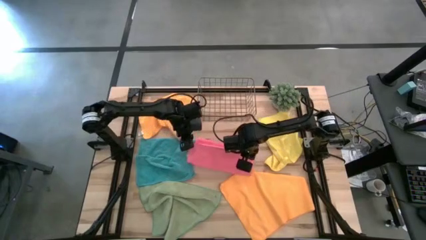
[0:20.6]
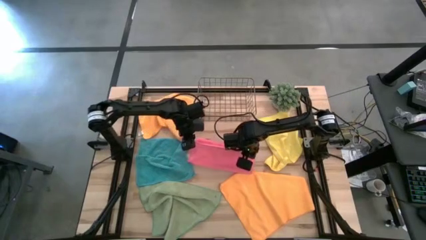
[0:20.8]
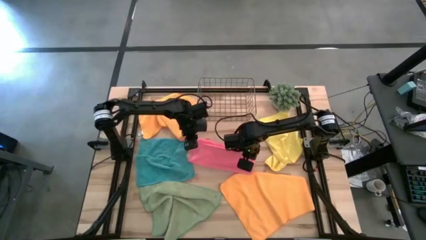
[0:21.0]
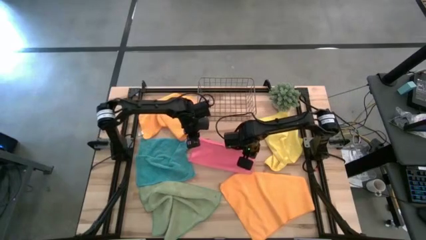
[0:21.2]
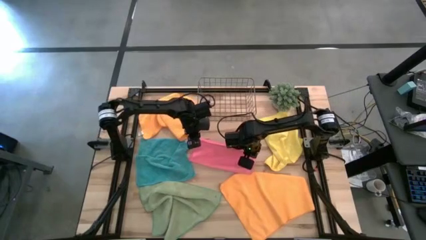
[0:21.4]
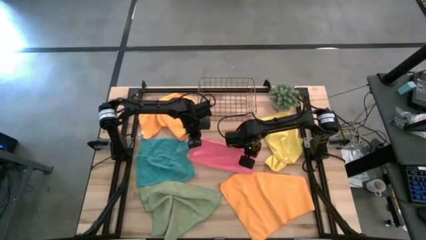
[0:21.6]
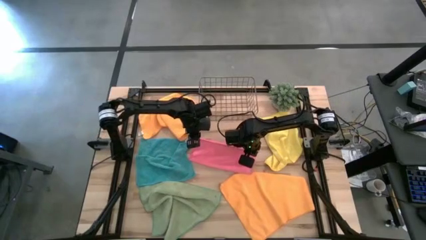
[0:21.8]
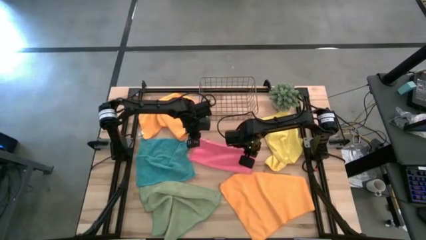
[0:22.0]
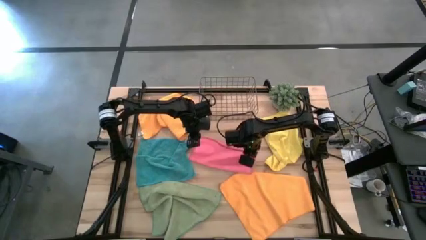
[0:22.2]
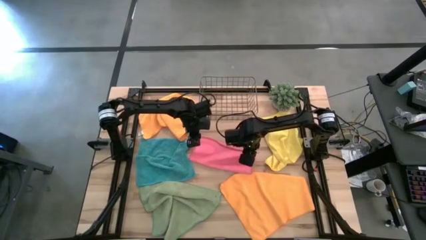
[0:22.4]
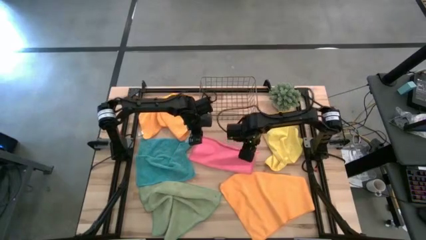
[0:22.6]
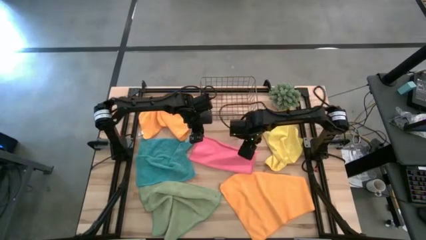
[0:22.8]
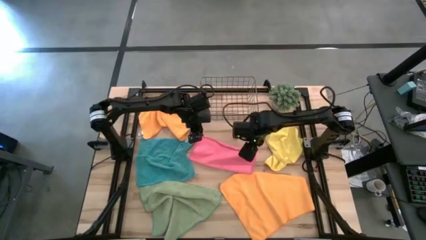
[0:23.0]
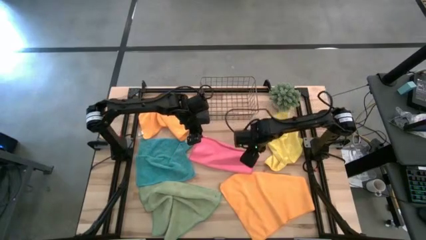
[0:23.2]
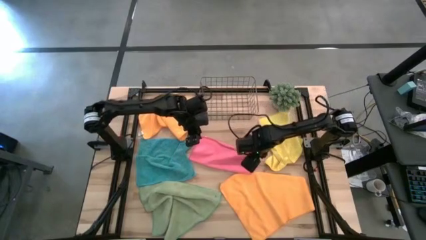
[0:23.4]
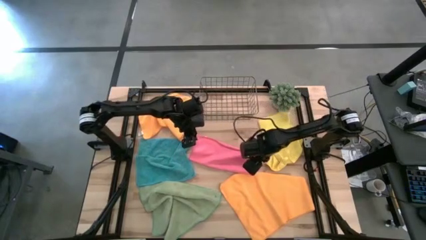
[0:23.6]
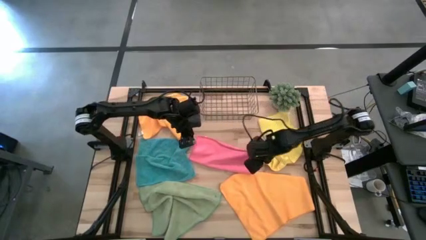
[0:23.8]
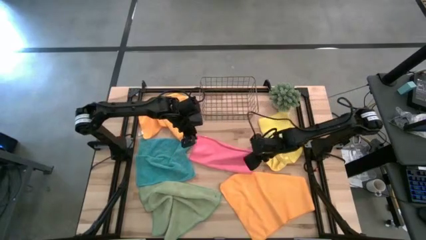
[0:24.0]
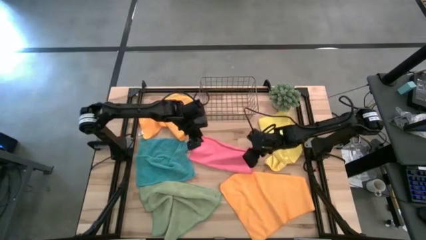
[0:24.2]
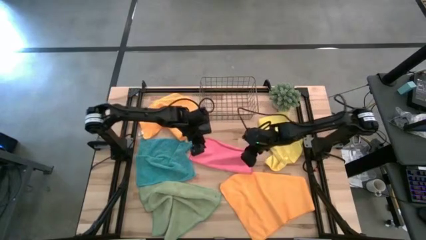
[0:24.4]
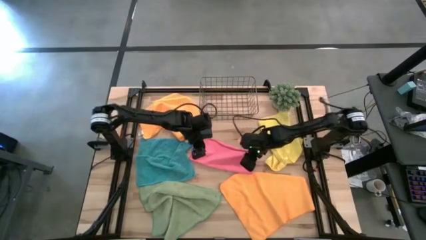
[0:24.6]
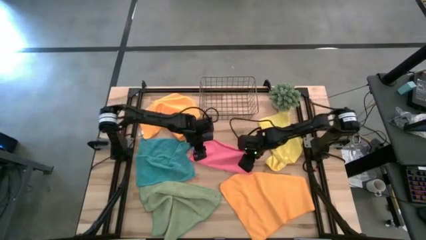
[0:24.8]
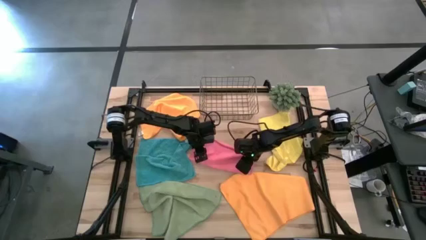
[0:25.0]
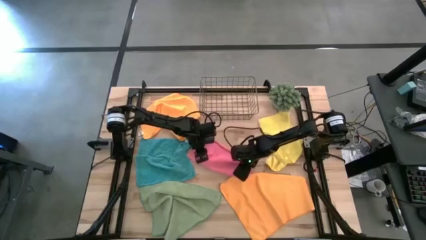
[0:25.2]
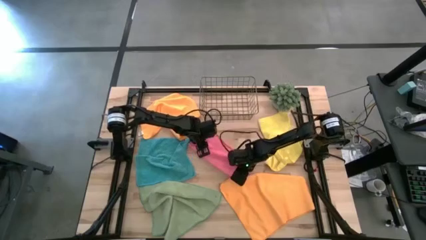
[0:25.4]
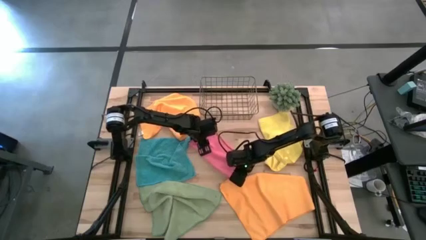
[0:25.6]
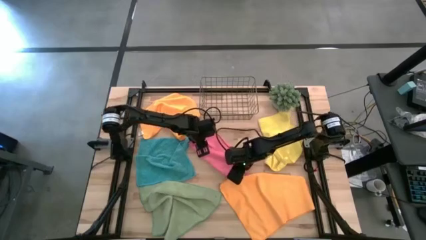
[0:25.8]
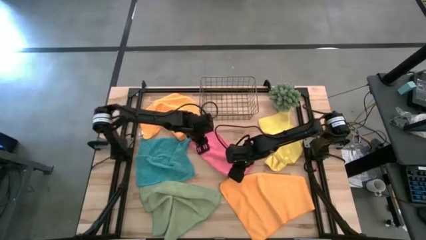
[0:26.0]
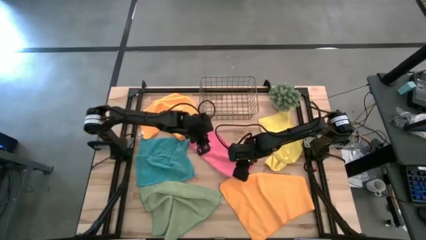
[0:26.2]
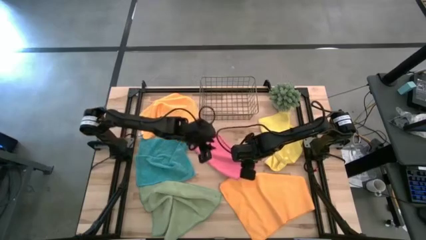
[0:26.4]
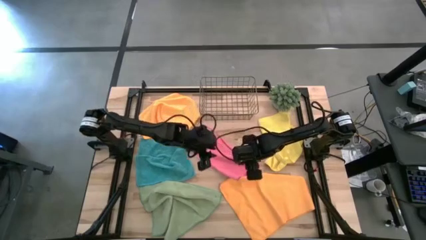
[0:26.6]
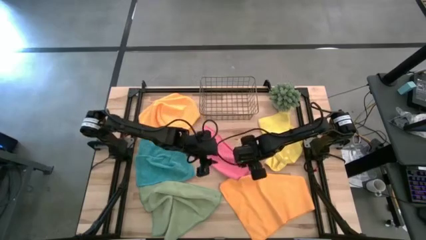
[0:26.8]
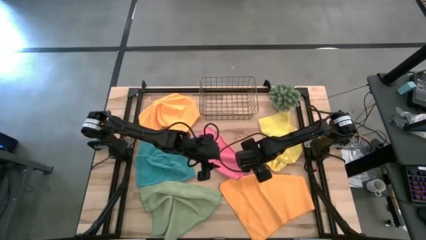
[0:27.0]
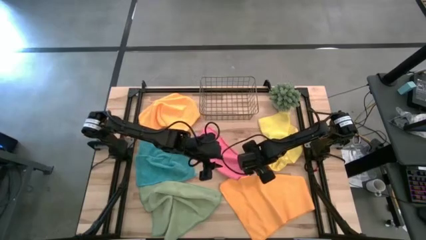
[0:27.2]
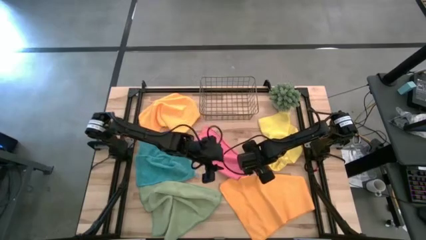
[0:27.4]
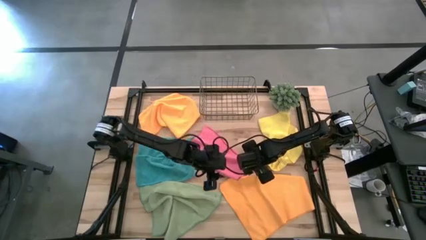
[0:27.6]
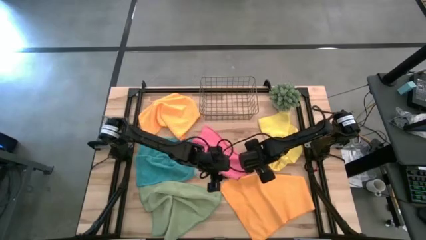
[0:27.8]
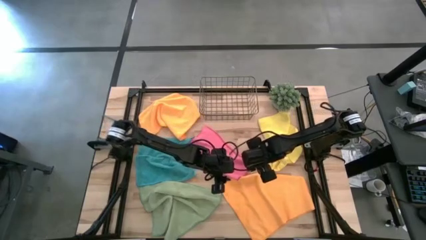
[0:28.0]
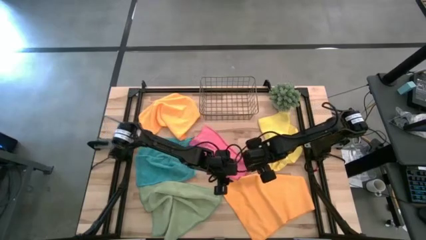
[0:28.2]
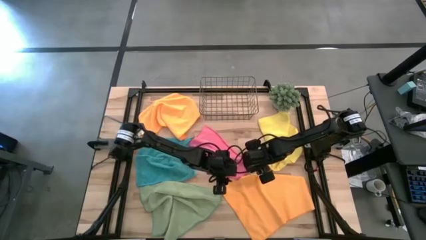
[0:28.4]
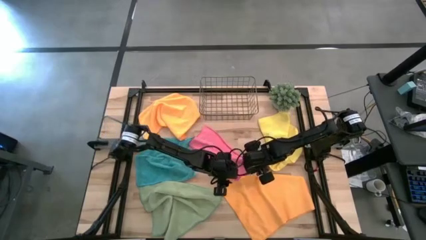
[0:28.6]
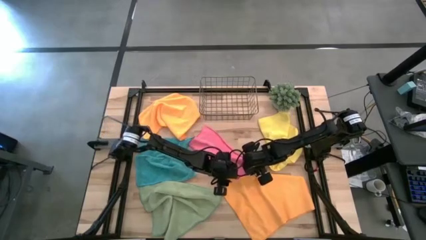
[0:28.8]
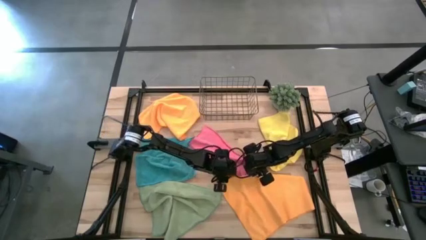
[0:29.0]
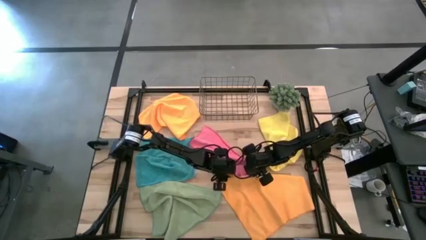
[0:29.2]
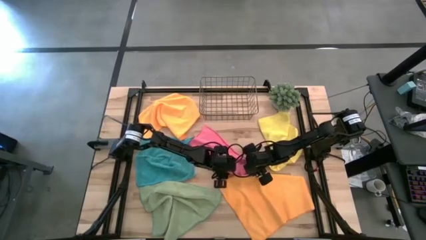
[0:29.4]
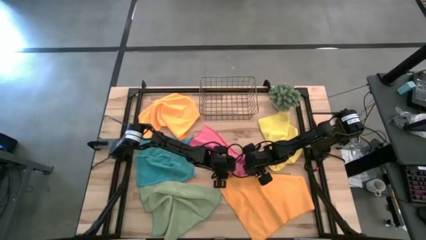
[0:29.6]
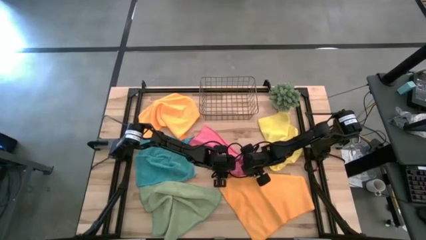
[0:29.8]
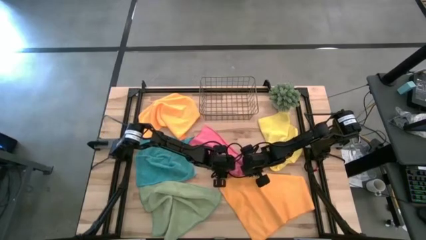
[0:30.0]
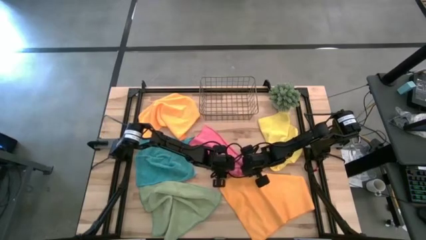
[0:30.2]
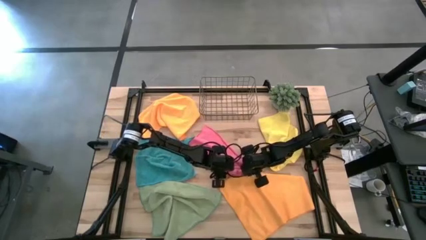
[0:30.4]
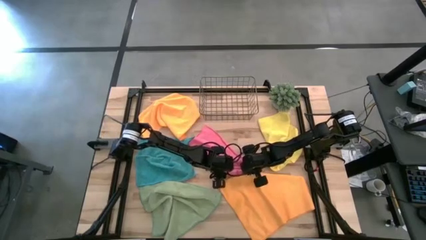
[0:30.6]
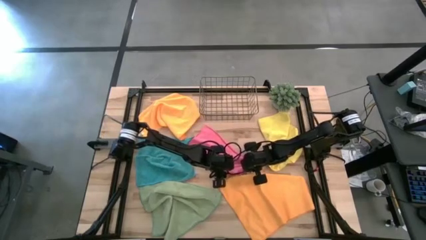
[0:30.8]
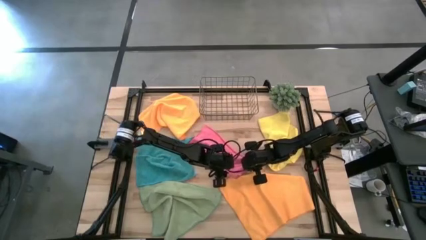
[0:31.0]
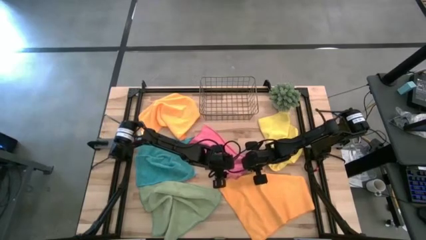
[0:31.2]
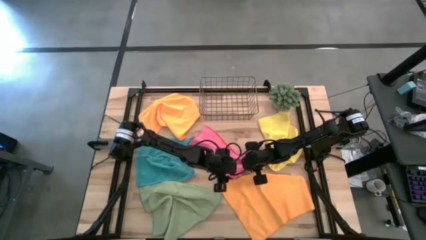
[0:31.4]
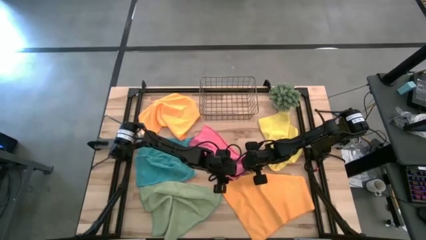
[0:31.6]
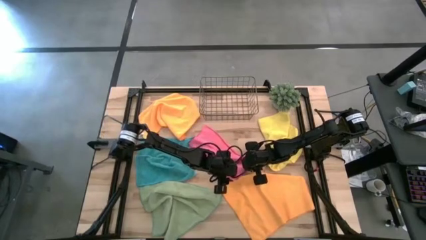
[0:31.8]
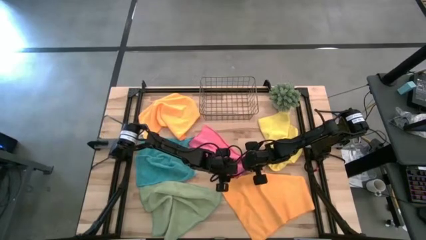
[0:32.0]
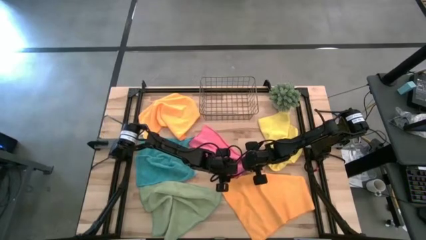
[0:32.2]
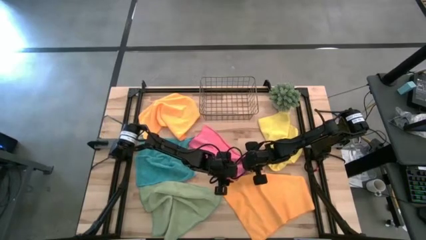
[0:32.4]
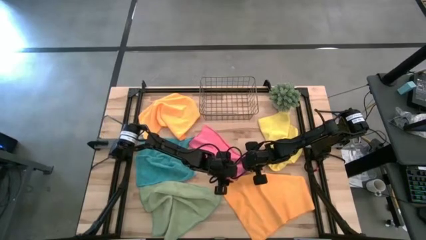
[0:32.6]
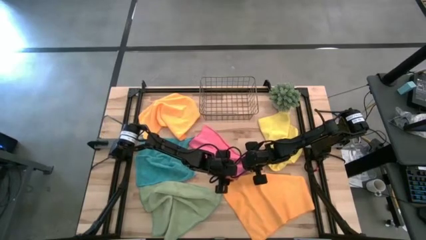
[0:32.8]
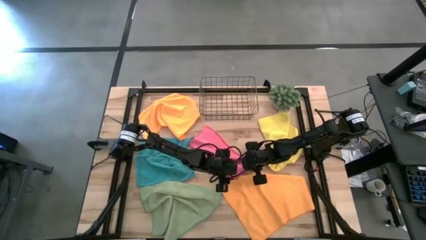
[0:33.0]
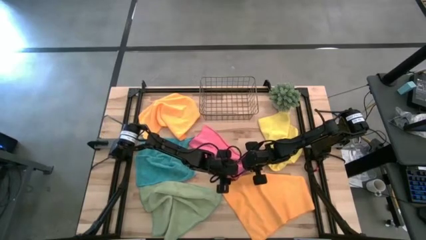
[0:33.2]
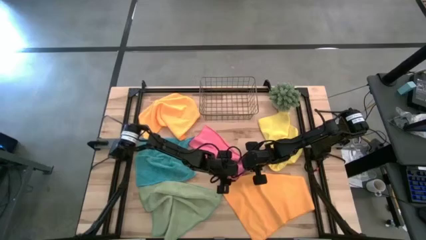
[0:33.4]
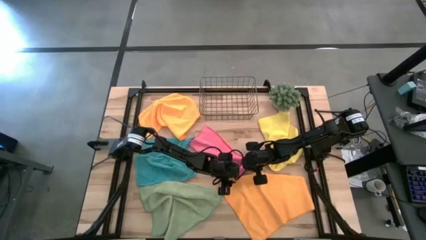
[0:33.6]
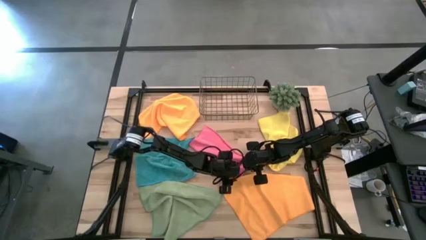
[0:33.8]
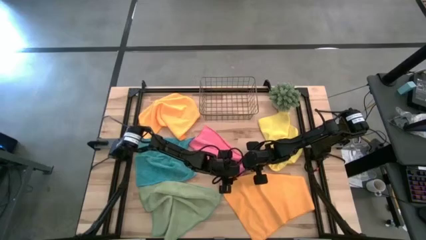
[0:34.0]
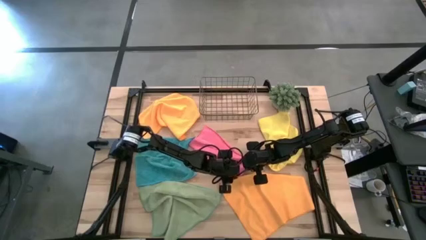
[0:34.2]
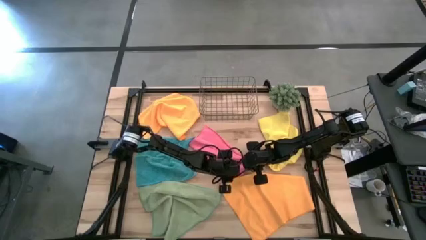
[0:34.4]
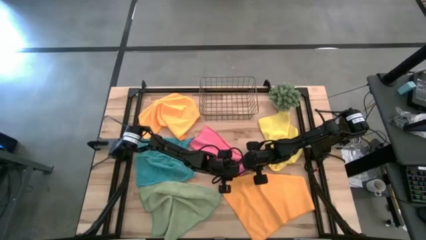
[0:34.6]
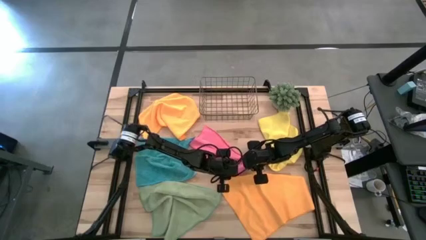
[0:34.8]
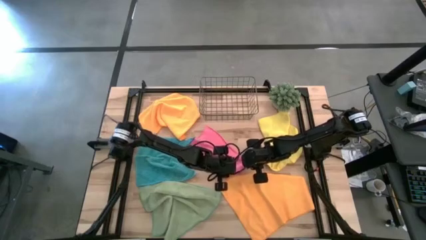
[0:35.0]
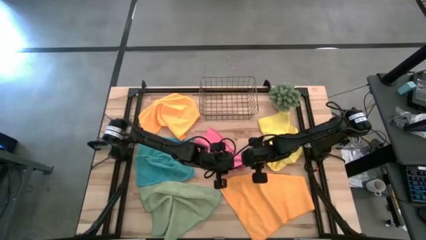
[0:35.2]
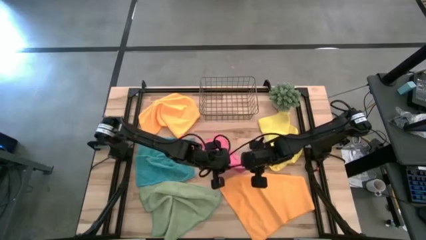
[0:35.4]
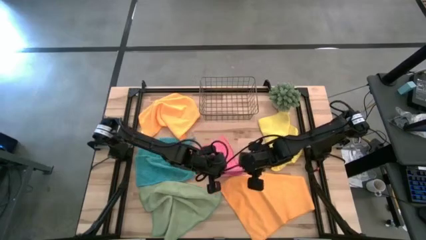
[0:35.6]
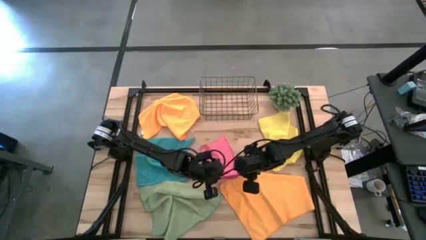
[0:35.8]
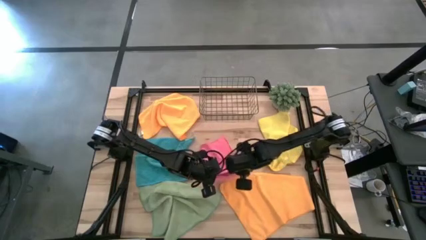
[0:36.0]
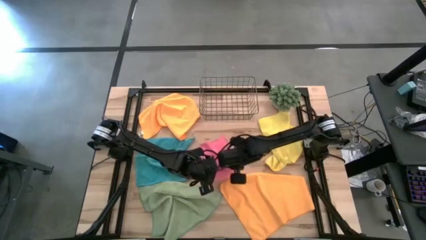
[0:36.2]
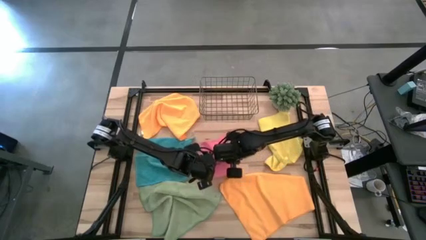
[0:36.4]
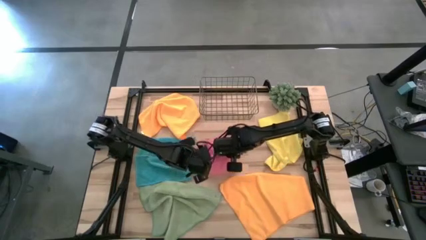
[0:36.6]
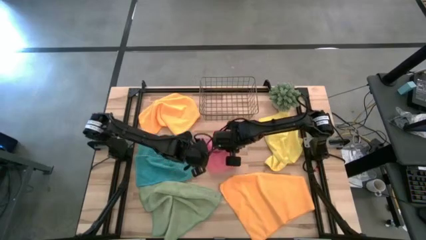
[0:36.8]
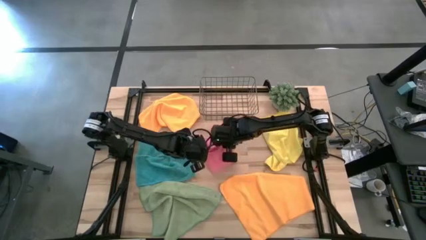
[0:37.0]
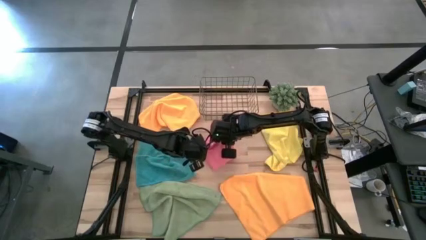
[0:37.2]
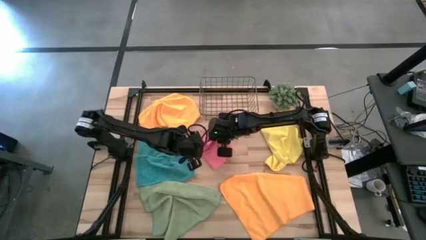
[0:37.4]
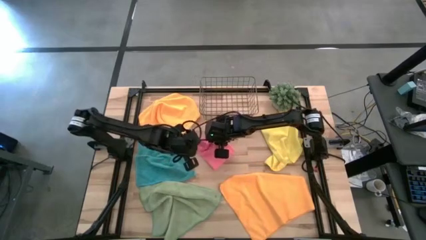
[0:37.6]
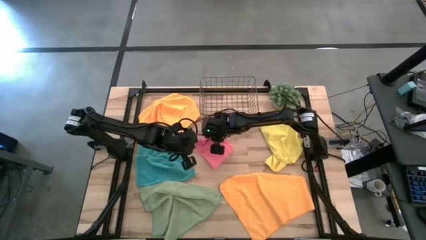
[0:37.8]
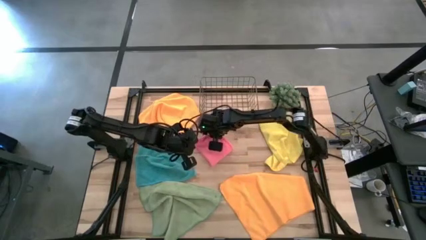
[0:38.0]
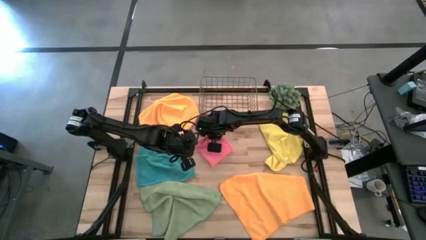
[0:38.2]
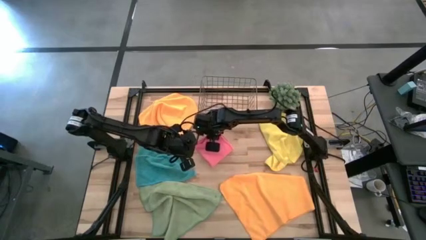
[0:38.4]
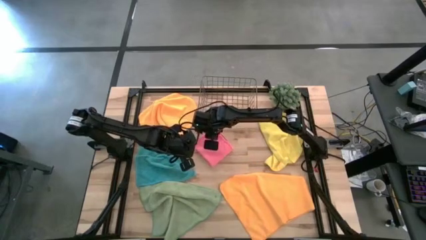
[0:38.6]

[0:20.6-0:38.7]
Task: Fold microfiber towels
Fold the pink microfiber cloth
